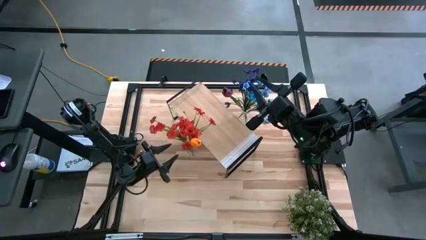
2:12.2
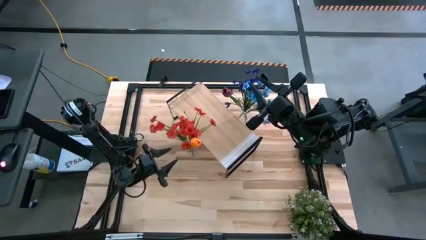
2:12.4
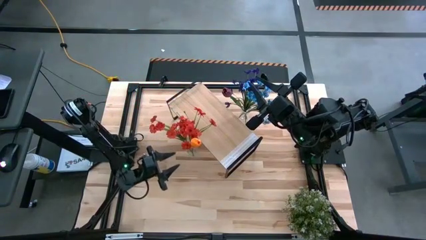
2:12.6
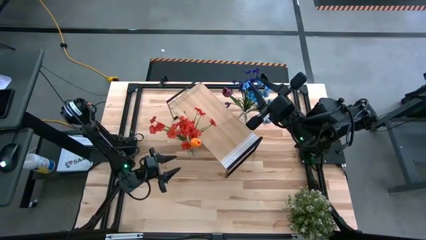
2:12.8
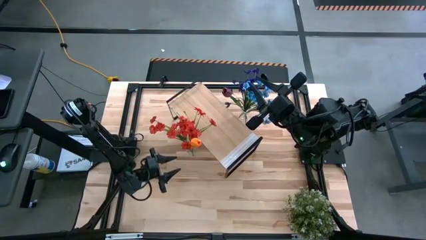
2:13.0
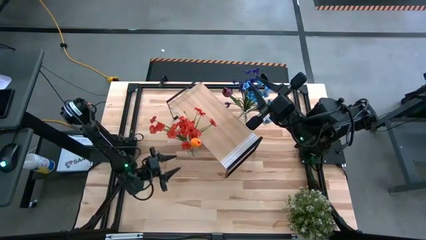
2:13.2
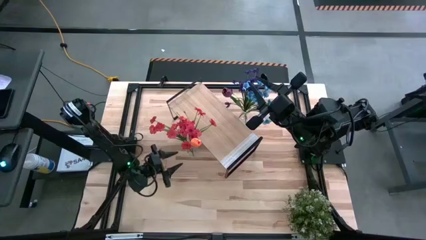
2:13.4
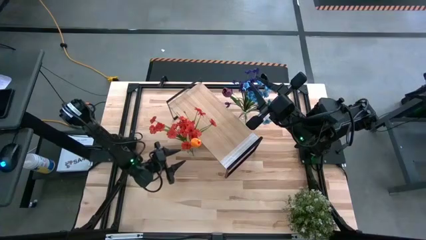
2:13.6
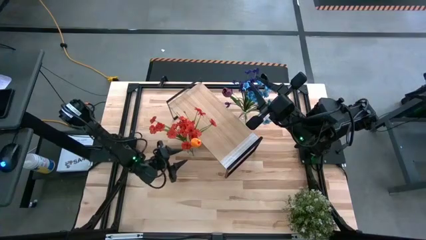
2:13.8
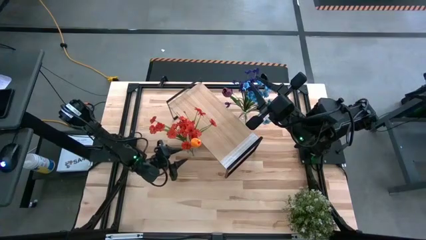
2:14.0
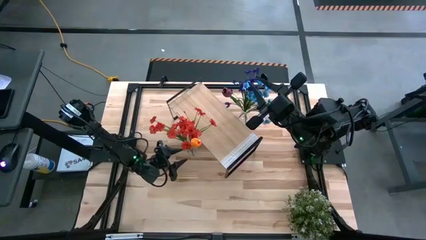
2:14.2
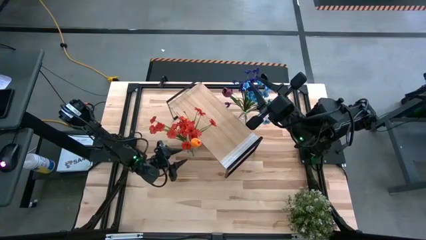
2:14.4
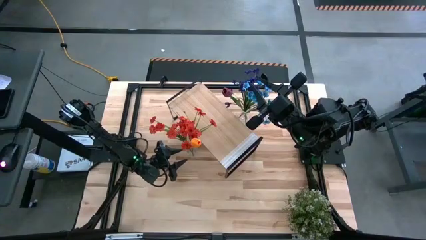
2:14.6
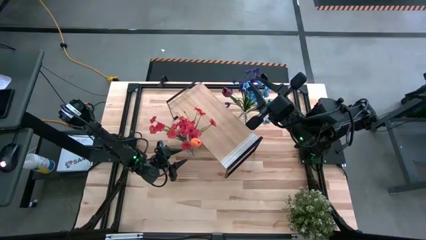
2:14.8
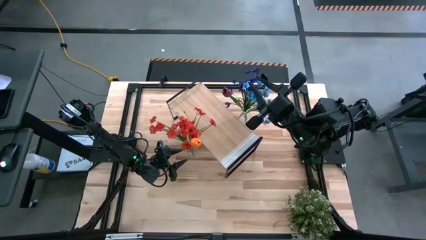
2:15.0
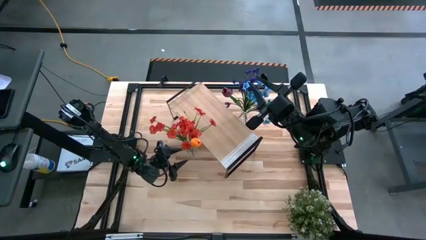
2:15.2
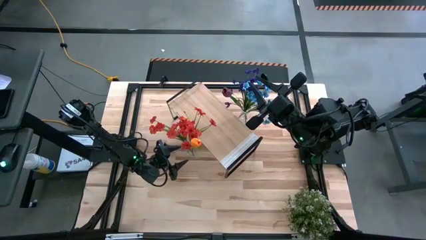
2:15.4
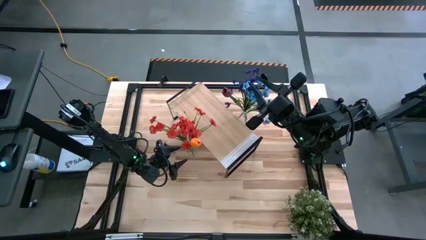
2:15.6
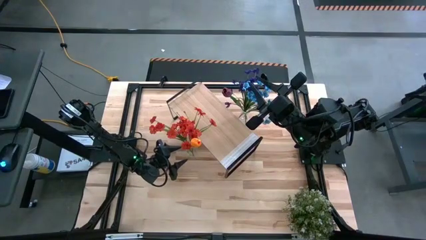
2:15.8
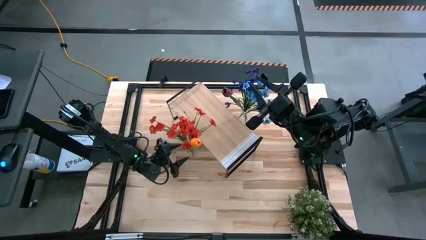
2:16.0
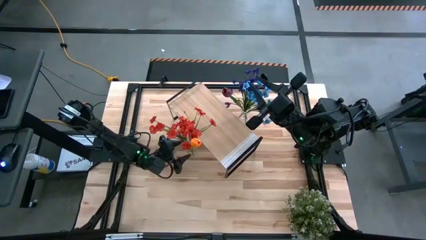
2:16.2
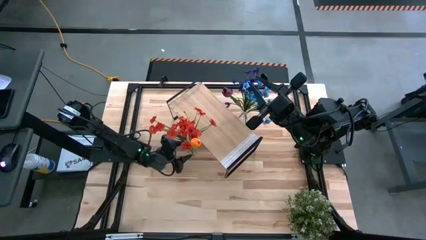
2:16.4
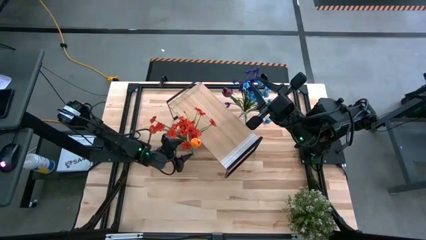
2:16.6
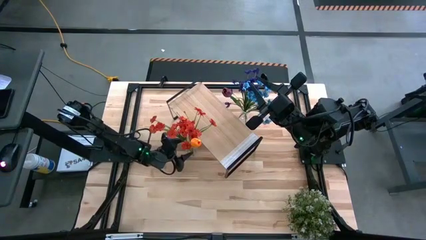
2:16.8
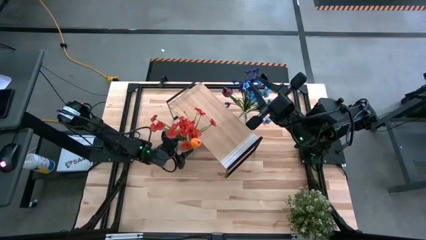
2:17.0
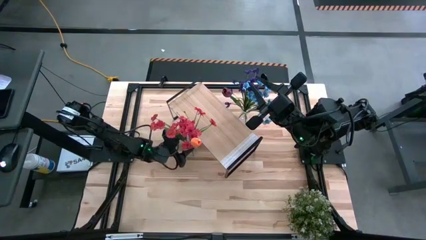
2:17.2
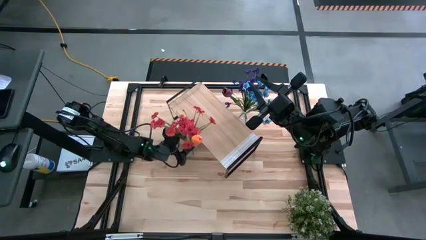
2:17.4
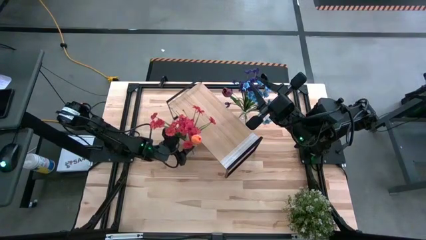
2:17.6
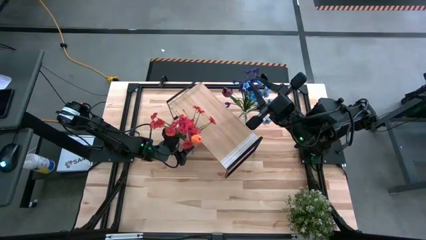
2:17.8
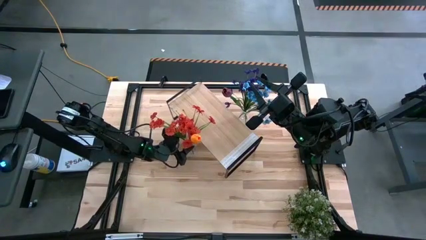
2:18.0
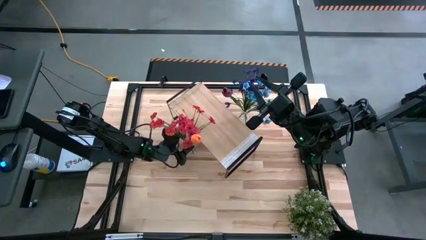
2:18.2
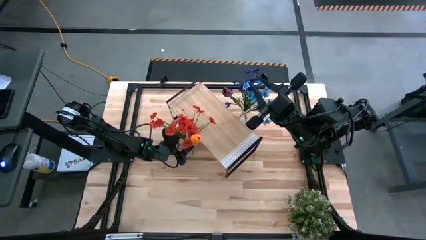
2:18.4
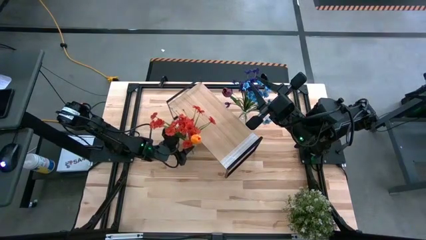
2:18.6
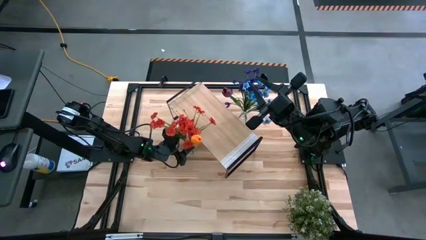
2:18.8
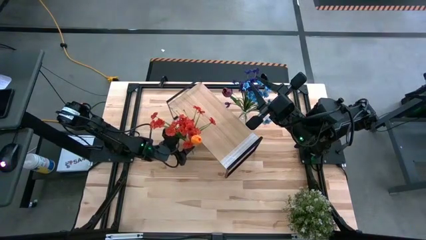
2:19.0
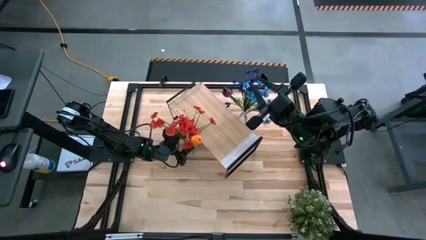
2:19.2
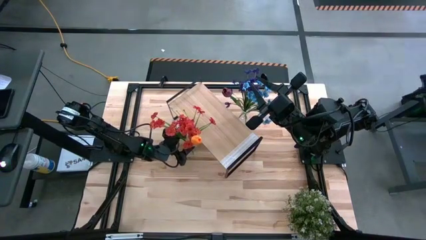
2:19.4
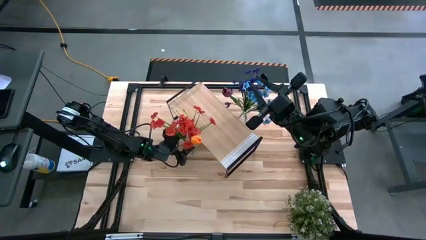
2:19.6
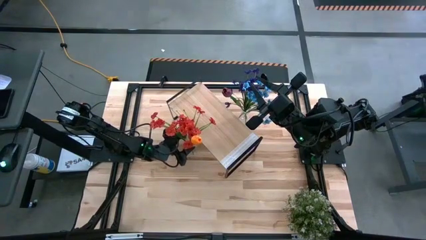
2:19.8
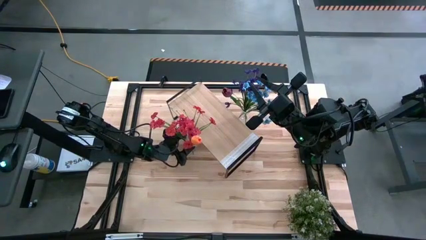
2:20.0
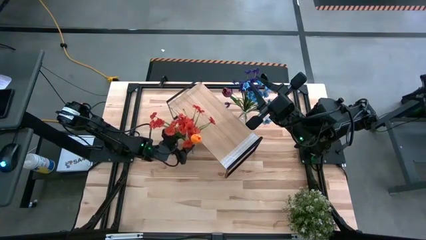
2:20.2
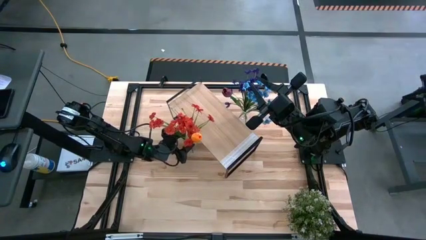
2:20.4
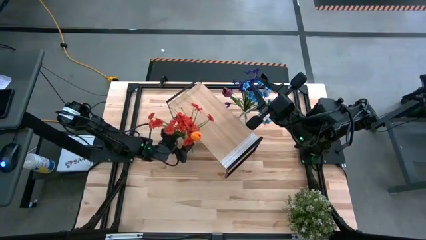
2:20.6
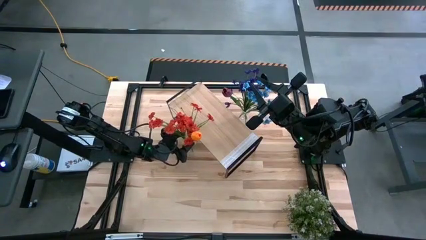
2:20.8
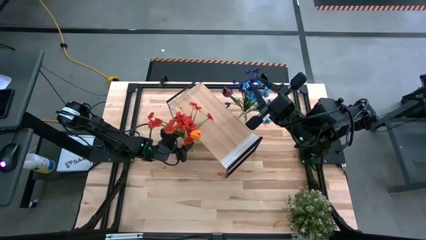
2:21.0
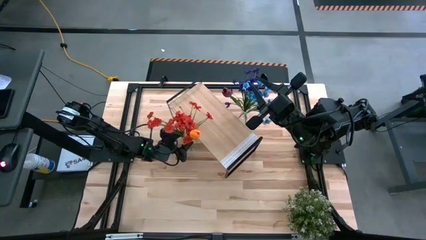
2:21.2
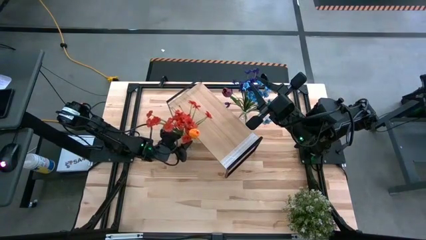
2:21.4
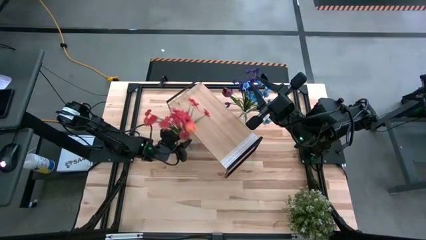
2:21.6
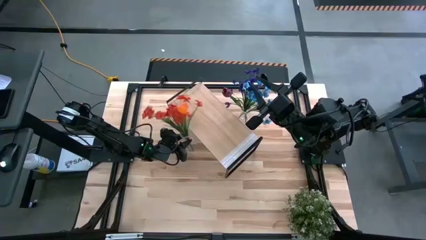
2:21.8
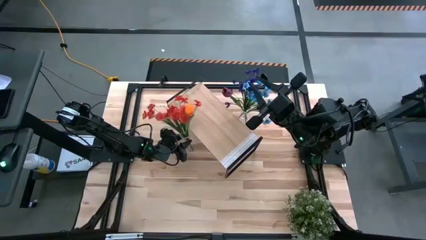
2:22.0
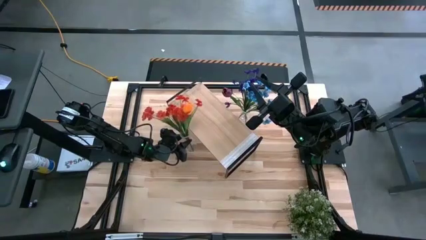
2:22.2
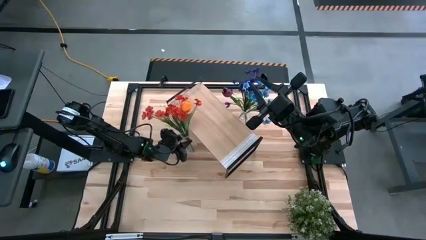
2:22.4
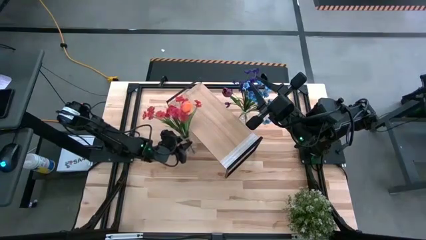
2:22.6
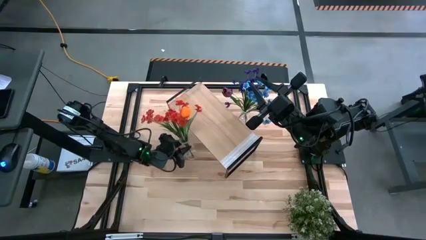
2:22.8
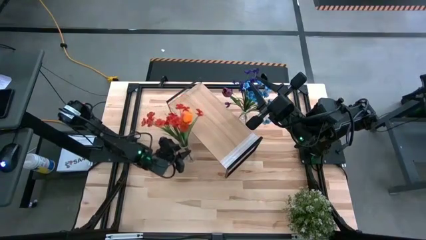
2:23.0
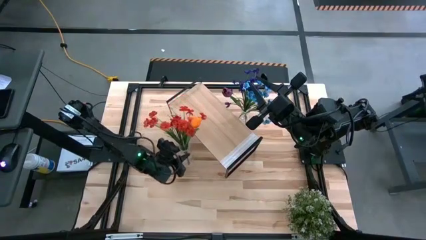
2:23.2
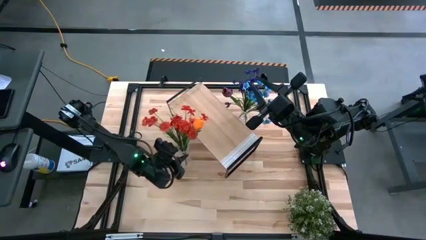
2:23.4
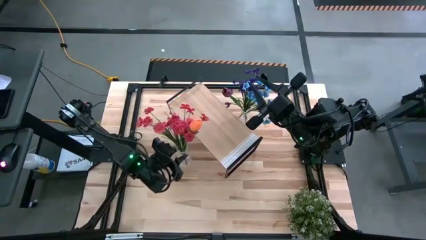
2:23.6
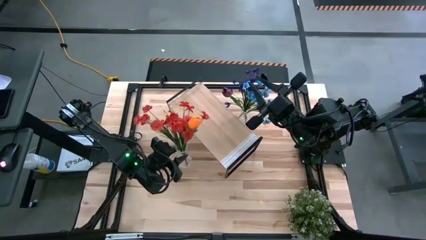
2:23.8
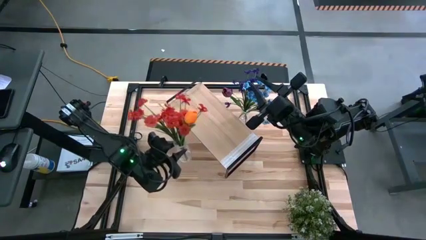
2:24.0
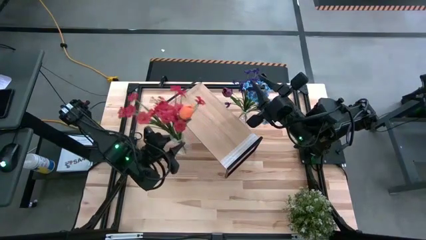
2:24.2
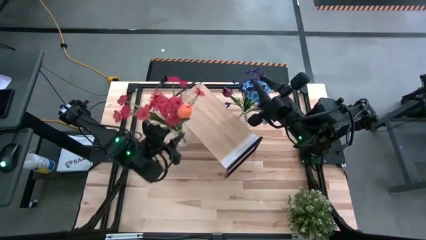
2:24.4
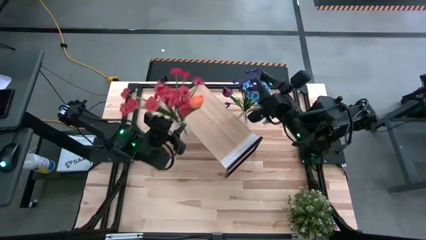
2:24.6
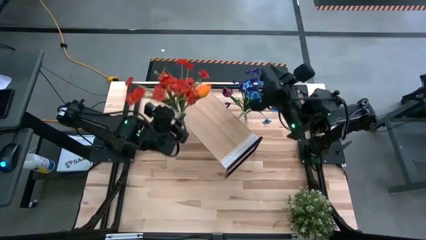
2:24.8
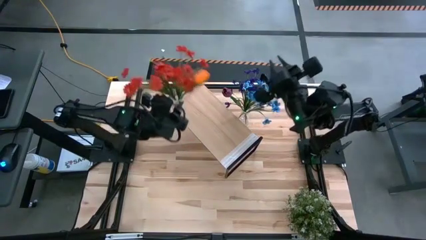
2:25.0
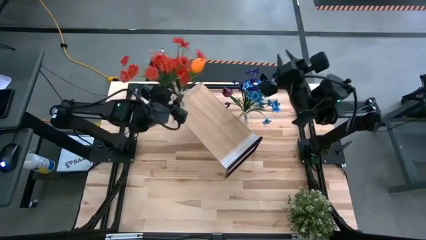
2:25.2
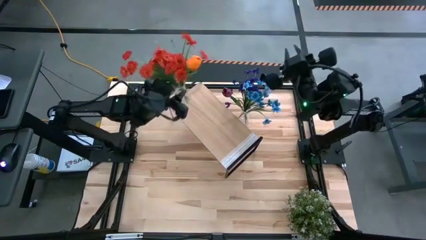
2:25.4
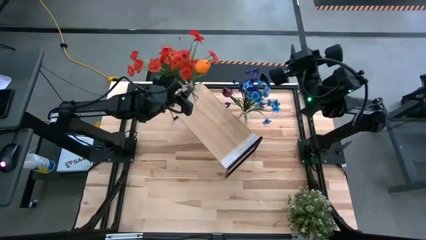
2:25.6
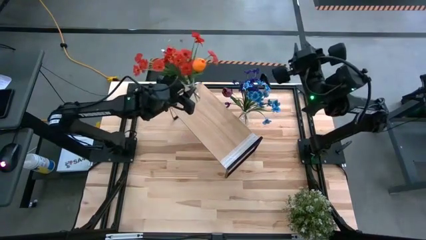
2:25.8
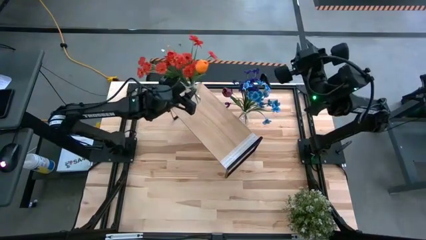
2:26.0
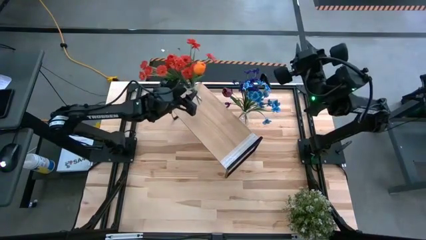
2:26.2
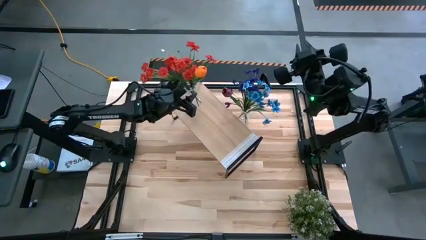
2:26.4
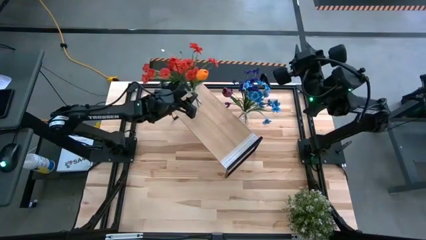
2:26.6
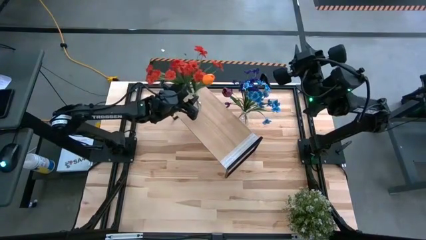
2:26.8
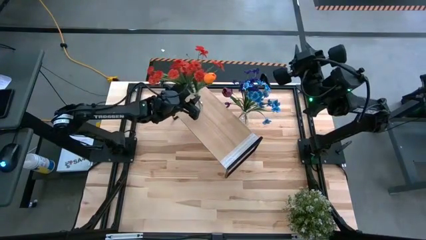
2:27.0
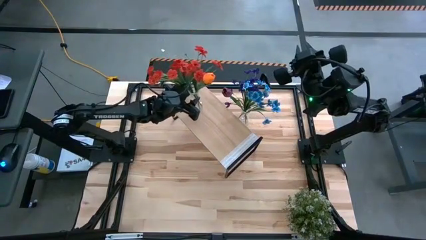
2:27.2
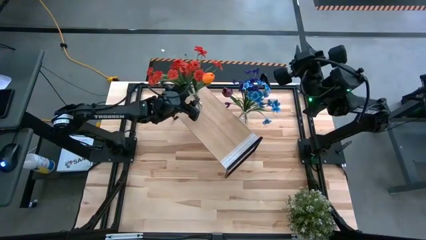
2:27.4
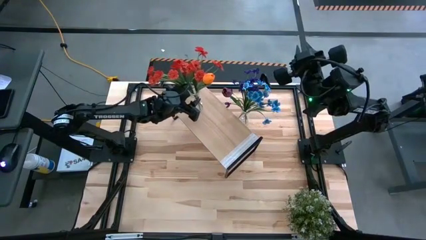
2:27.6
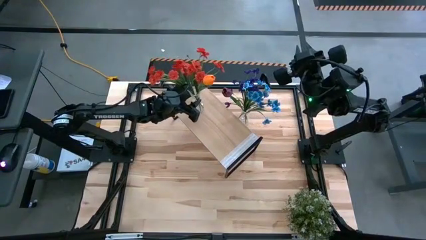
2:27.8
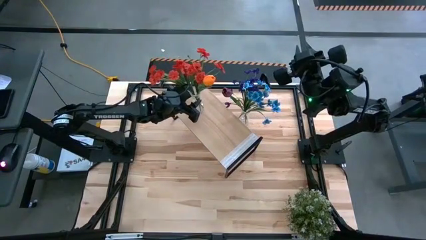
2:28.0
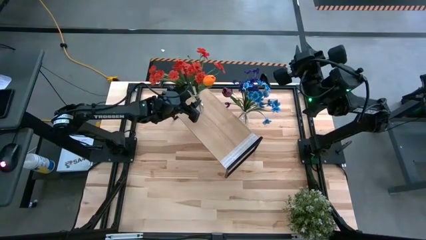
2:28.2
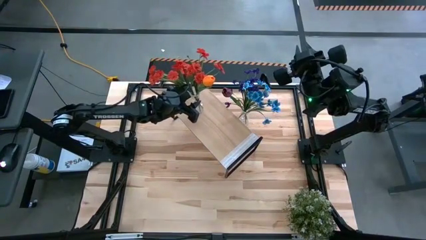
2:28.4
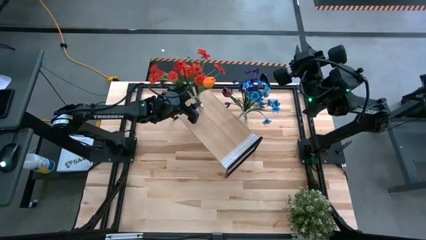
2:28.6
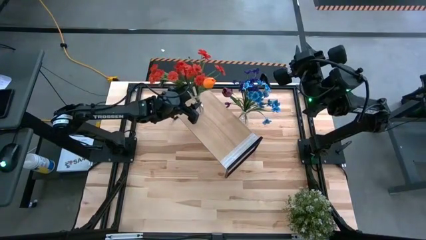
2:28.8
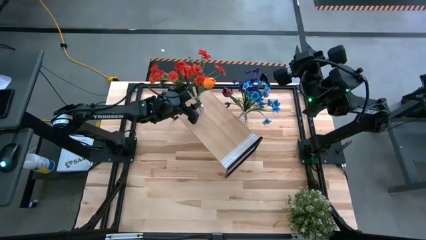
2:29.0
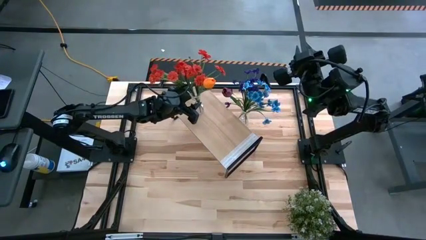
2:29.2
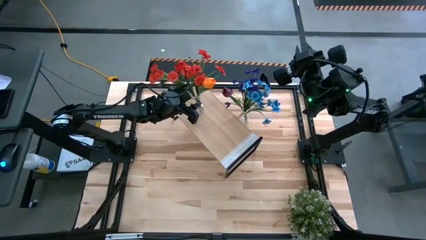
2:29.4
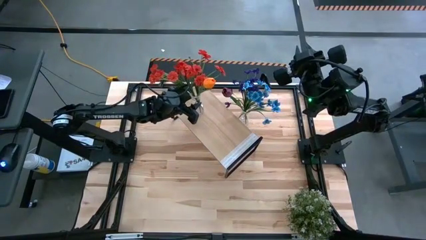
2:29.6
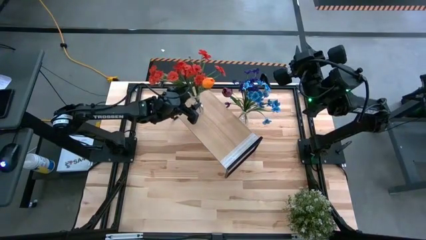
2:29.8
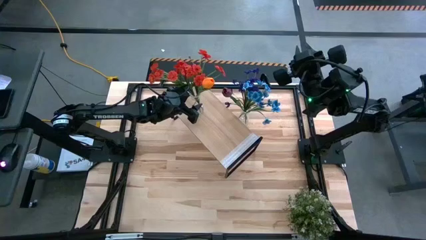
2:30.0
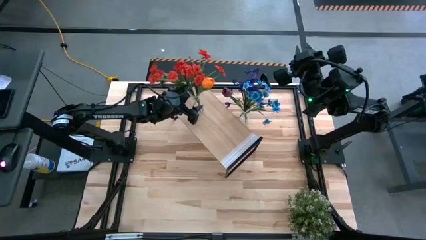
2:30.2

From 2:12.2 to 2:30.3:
Task: Pick and place flowers into a vace then onto a shelf
Put the bottom transparent vase with flowers on the shelf
